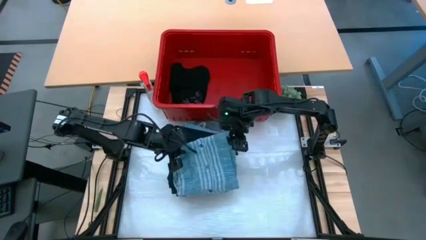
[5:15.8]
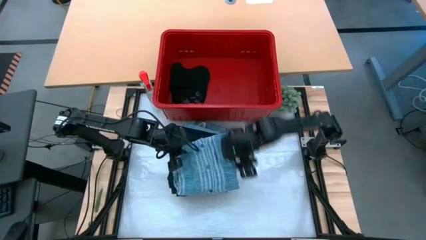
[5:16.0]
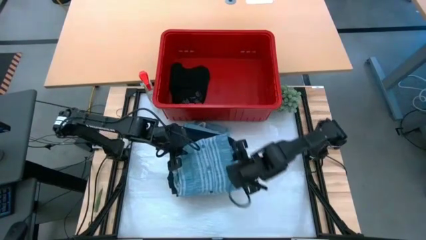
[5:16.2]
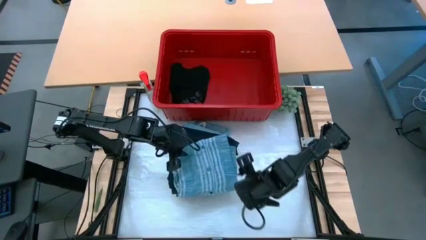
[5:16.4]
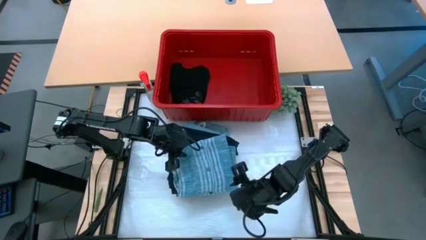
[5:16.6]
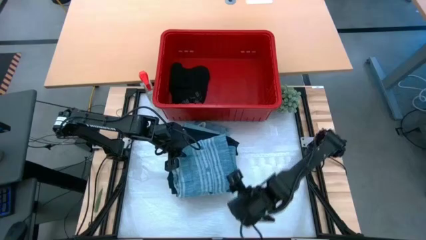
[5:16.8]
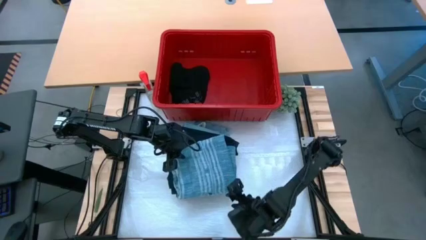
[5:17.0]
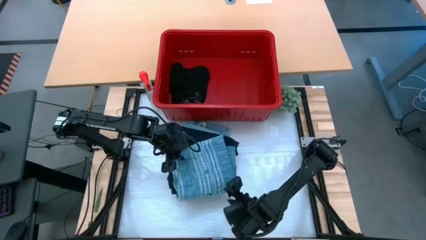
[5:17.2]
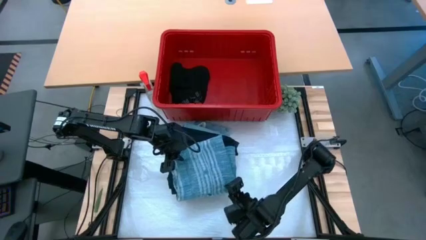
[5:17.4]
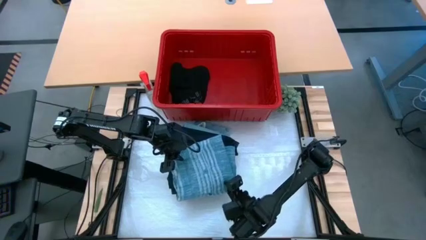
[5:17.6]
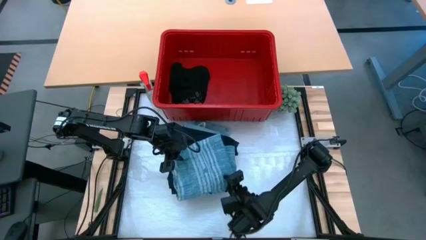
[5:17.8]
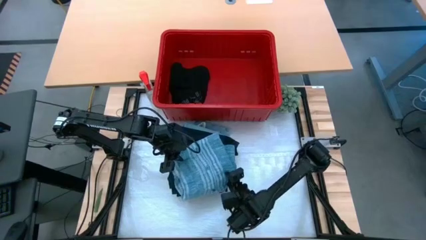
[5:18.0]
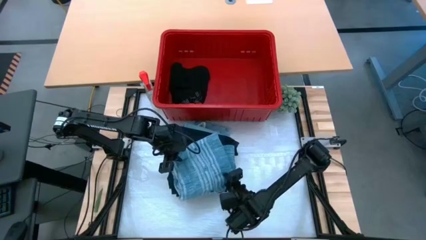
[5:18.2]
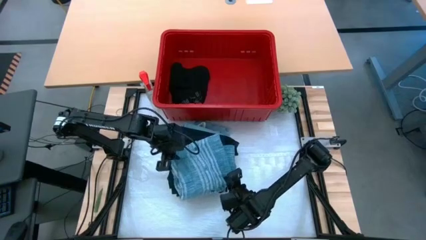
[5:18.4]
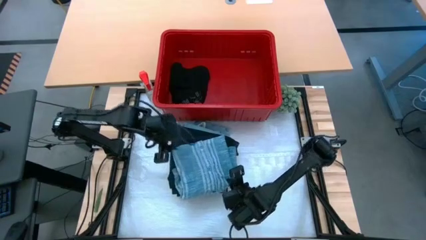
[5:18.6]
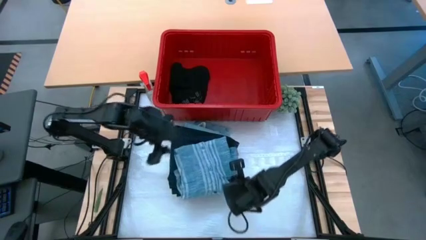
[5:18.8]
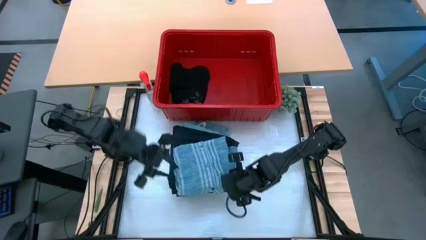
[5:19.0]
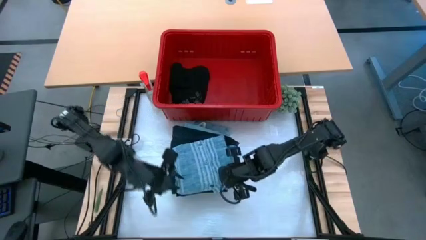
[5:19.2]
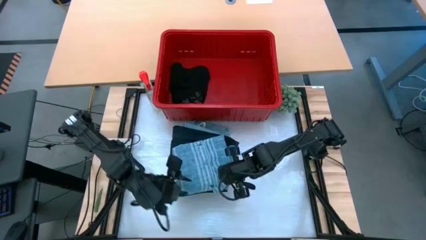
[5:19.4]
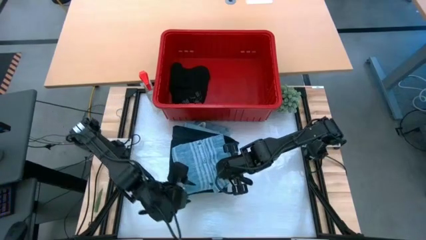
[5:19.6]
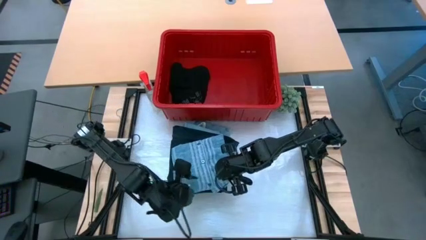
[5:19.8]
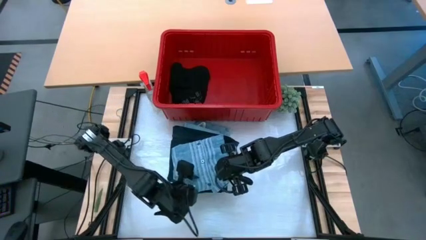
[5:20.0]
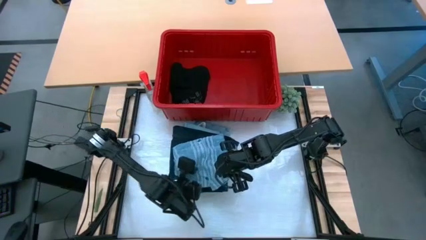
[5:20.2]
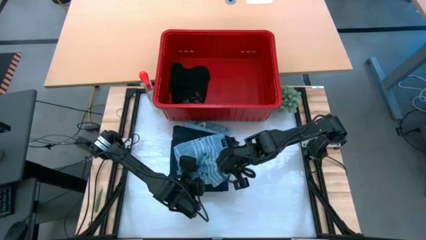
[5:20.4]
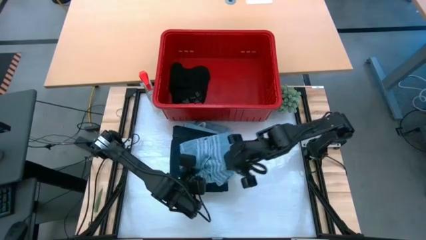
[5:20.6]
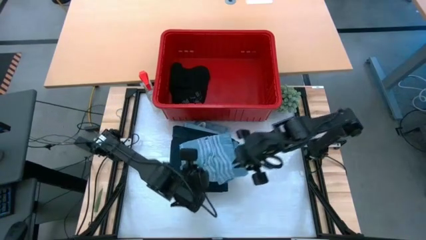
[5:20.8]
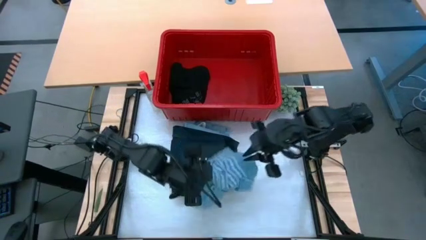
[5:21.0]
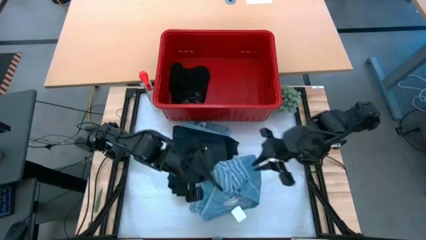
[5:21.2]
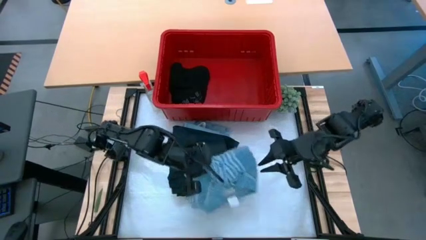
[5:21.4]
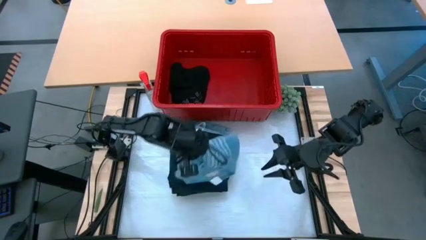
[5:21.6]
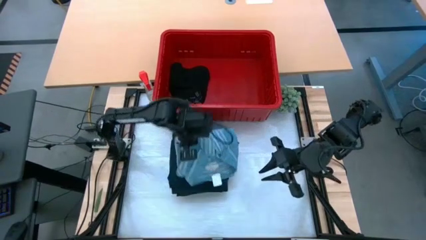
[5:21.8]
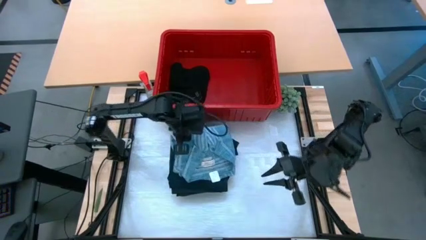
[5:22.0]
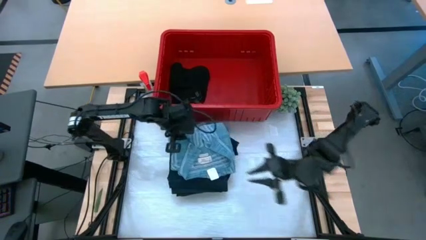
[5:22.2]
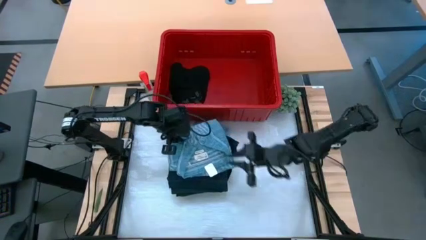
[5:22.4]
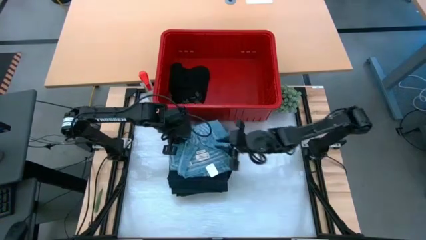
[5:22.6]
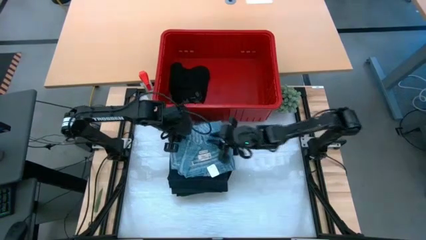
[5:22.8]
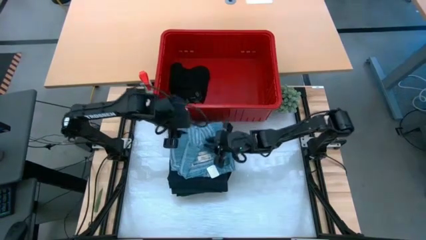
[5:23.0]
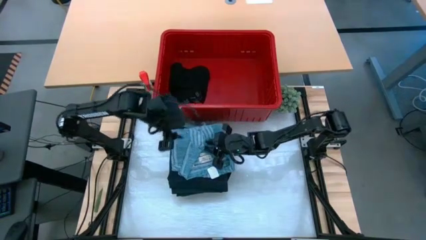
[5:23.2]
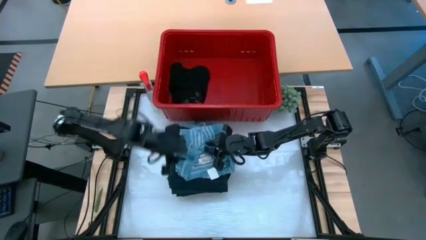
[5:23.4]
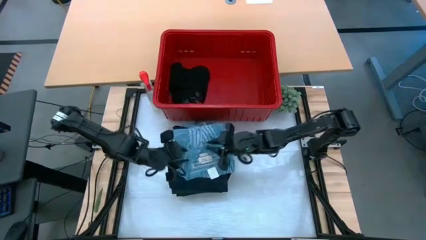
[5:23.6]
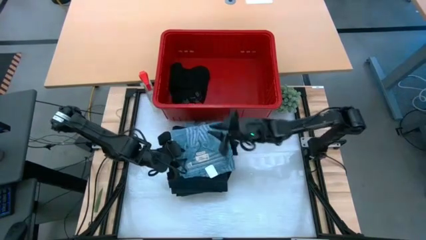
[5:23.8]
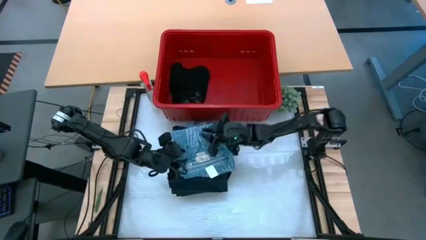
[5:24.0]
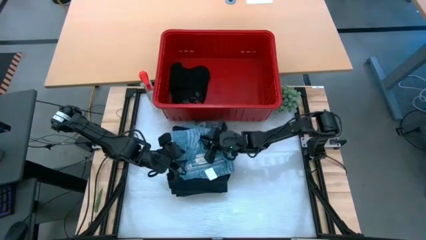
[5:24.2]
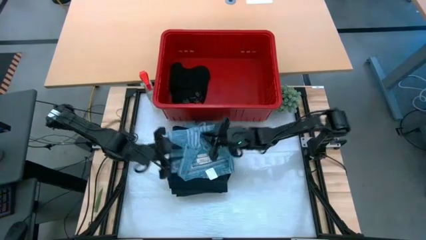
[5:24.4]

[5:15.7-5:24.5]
Task: Fold Laundry from Bin
Stack the blue and white patterned shirt on top of the dark blue pants

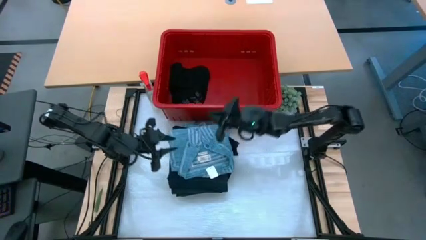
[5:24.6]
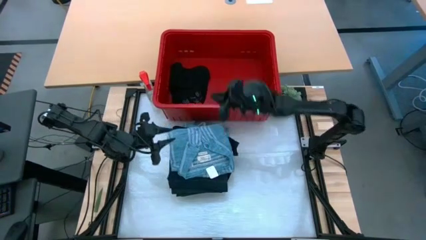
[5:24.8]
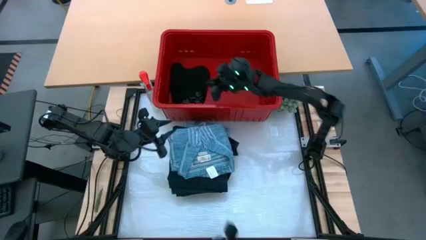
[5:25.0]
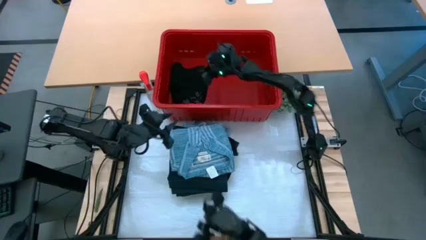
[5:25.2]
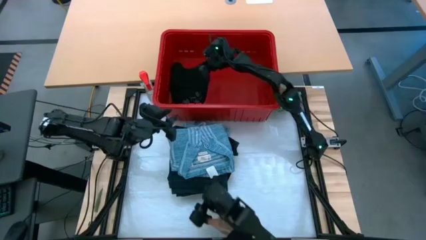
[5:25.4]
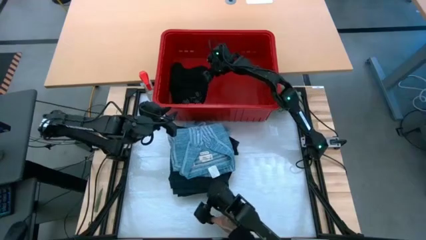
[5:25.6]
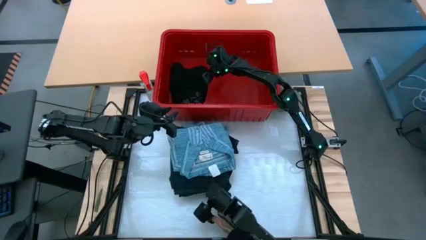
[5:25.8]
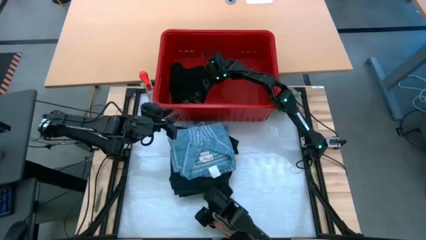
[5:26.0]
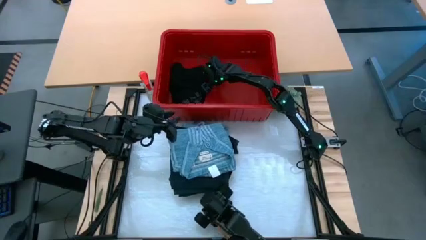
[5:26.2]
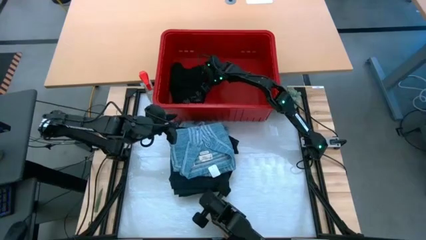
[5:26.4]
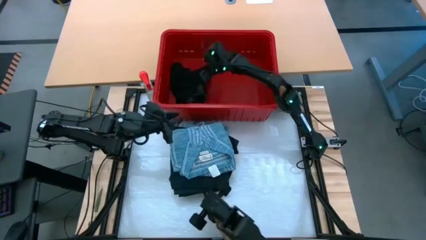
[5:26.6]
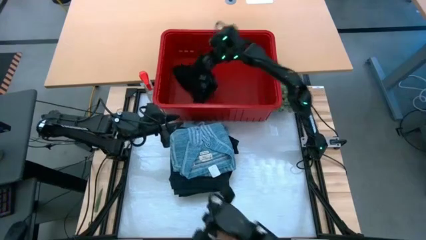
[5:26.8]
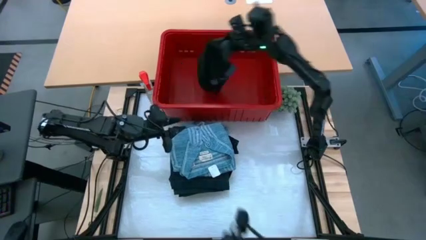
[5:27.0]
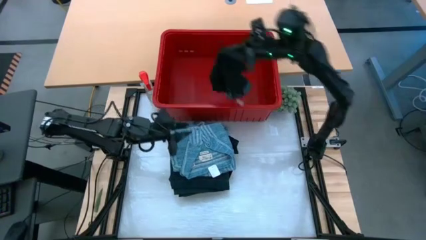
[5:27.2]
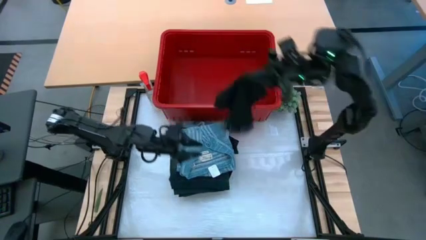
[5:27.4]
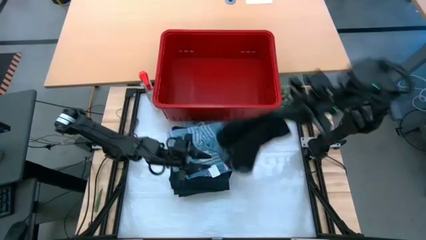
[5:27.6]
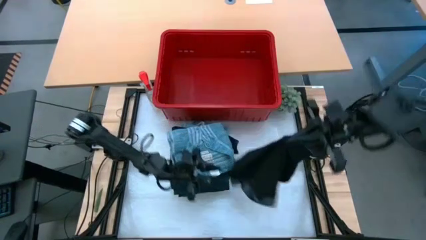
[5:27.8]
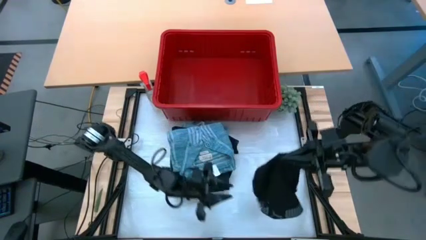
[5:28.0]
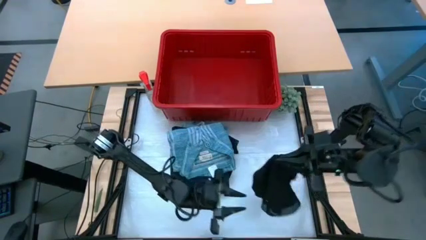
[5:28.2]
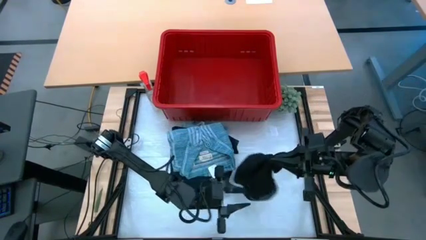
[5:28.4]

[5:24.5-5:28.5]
Remove the black underwear from the red laundry bin

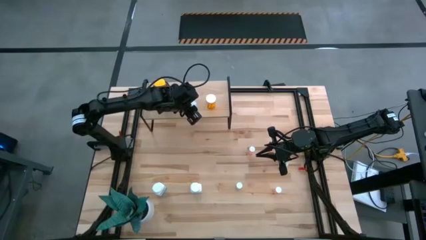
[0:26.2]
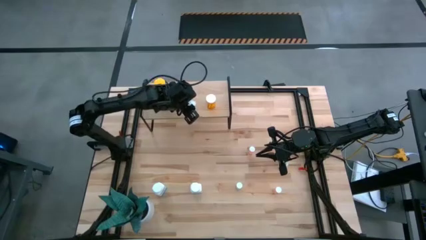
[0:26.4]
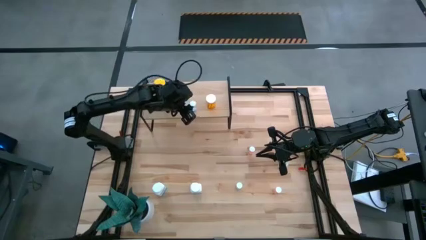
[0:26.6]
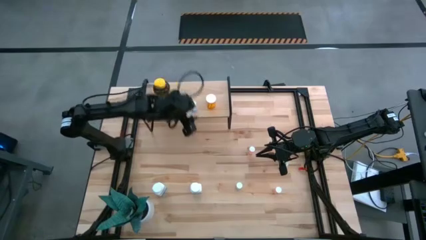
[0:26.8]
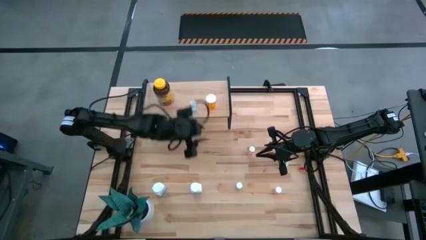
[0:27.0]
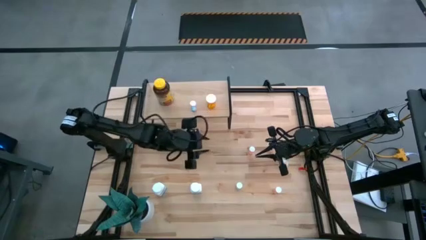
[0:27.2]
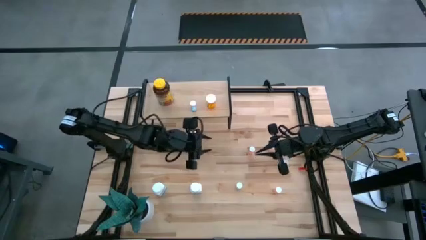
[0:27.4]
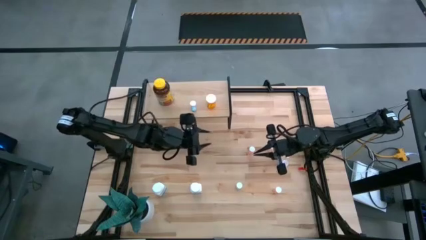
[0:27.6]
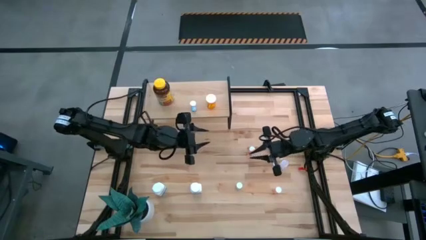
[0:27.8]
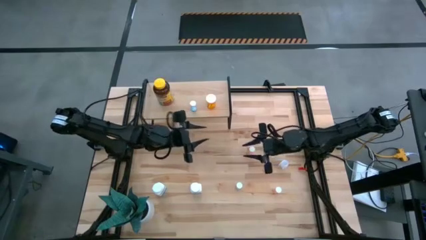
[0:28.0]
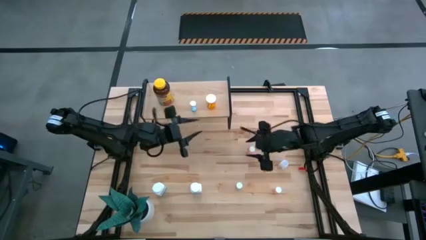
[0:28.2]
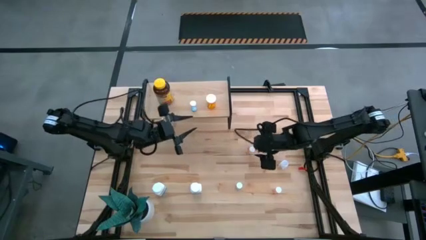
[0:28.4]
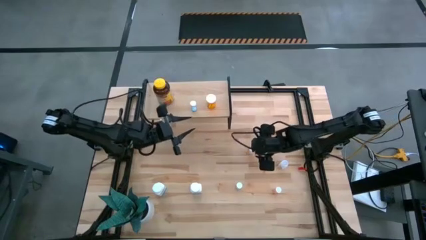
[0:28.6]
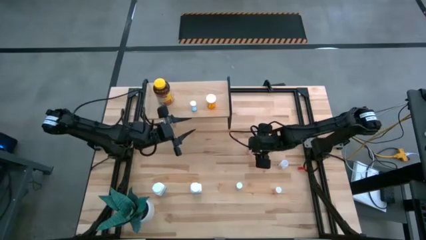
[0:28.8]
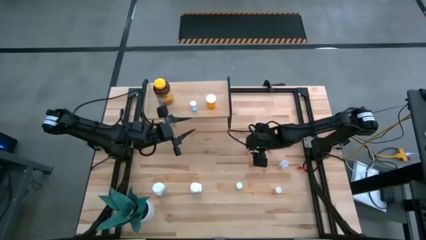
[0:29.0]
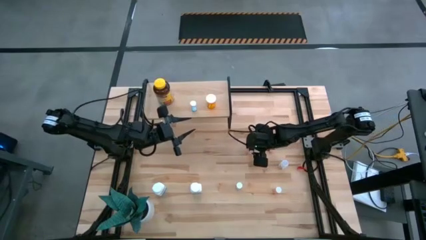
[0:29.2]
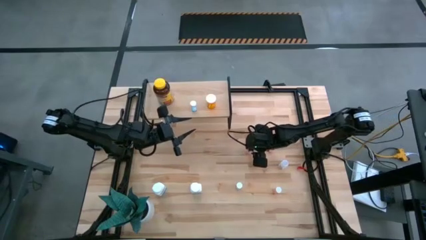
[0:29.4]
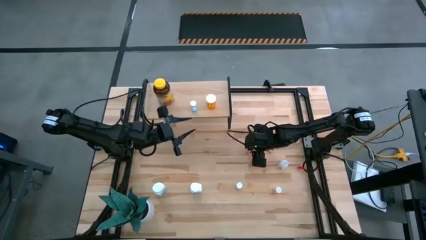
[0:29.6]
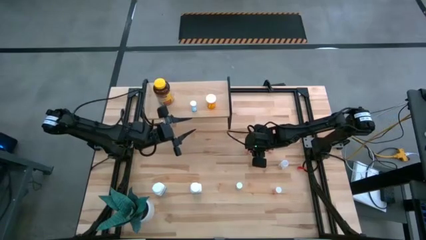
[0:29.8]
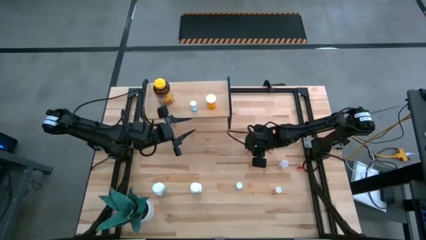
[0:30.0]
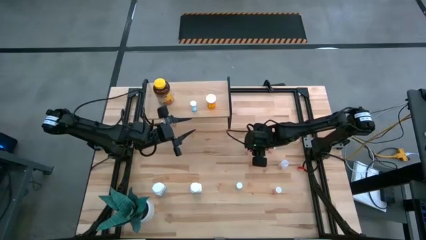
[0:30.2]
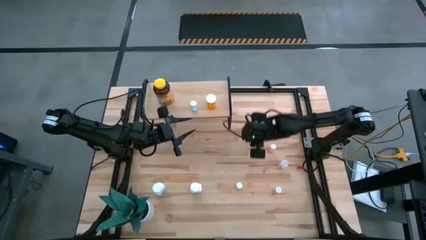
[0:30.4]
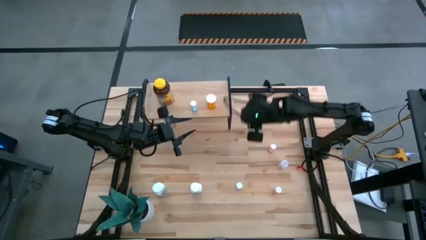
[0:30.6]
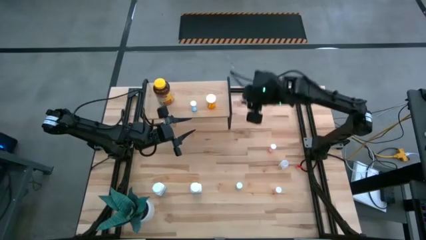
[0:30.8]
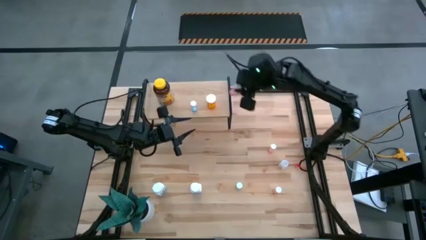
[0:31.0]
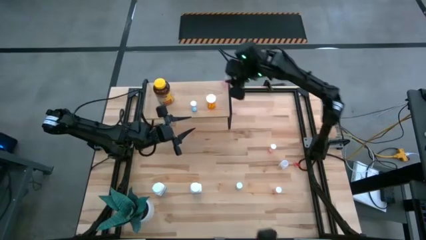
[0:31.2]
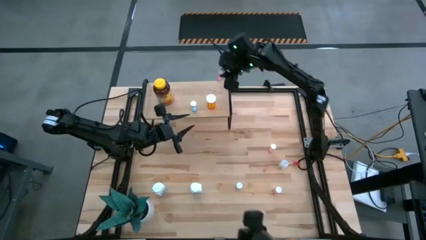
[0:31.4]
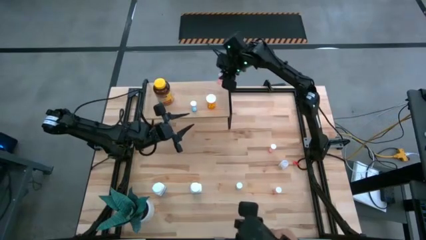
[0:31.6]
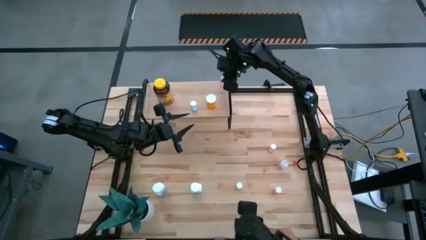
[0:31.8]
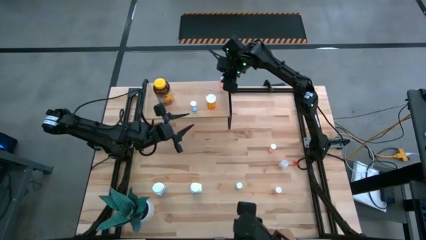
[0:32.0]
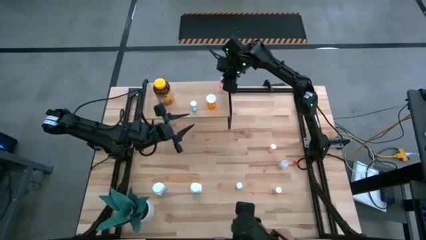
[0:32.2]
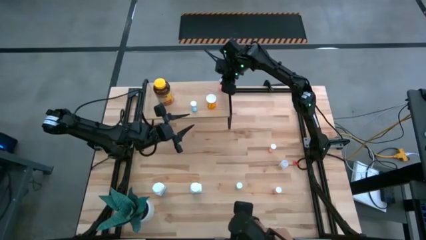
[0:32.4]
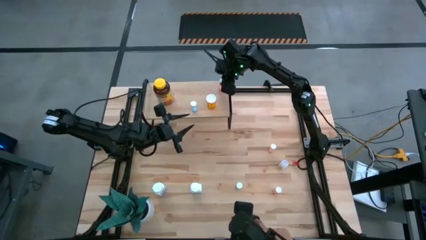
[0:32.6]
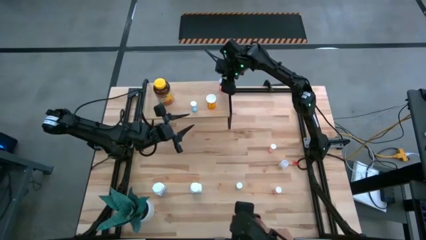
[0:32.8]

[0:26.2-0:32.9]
Task: Pick and place medicine bottles onto shelf by color
Put the top left pink pill bottle on the shelf
